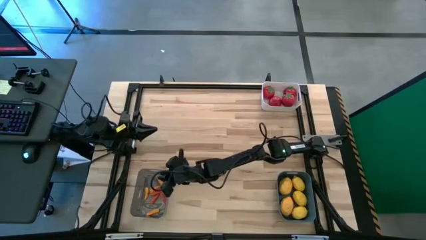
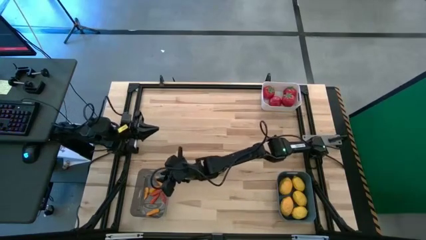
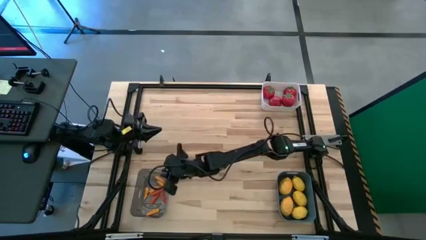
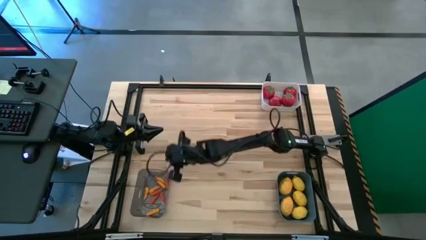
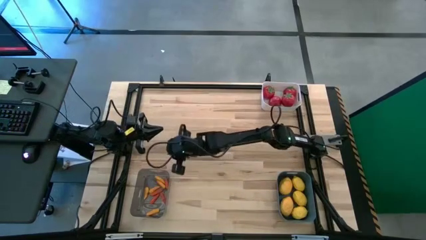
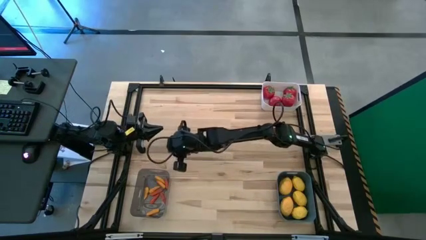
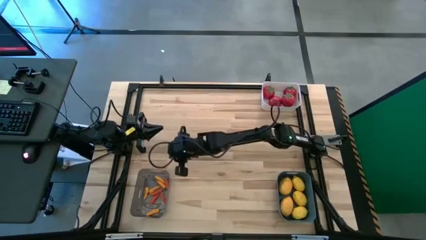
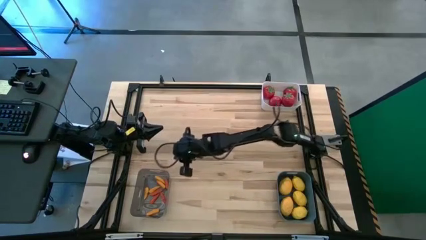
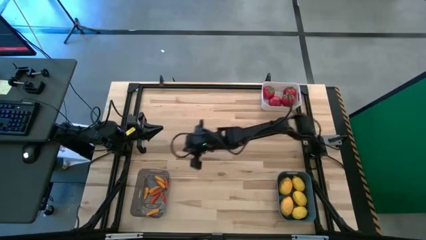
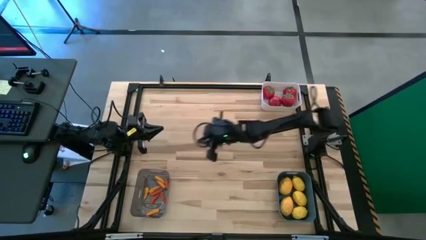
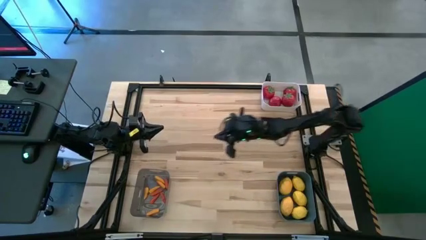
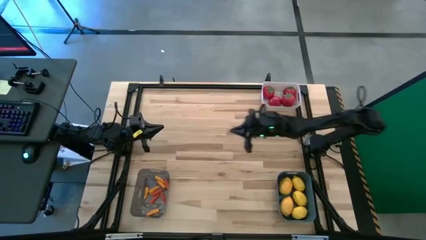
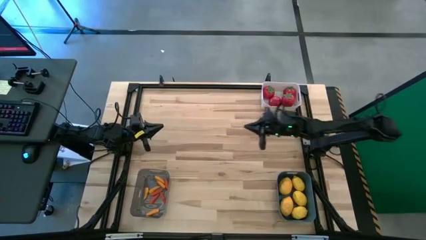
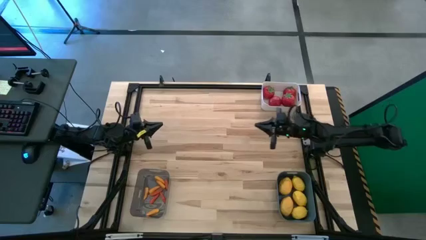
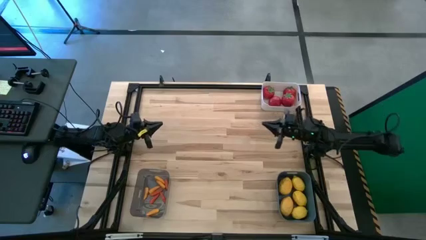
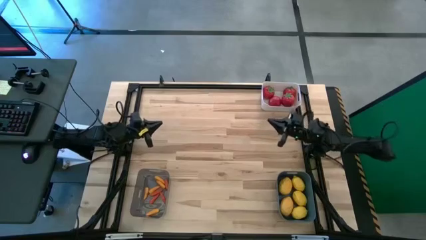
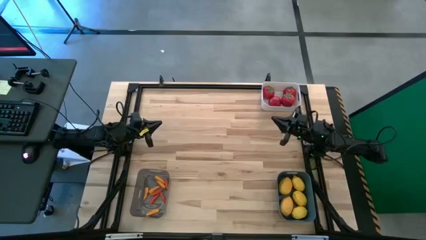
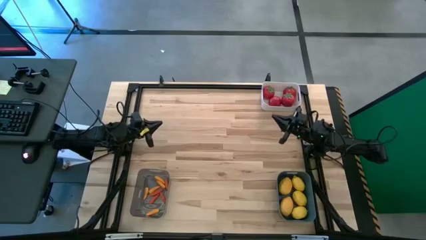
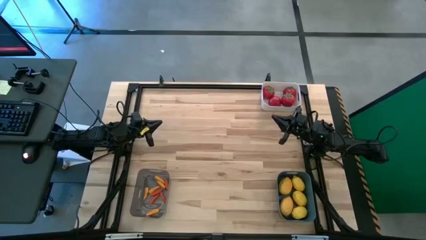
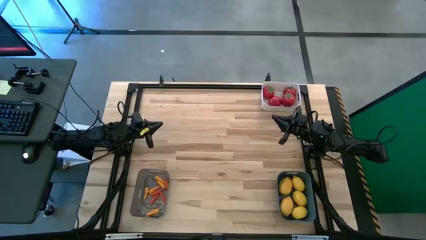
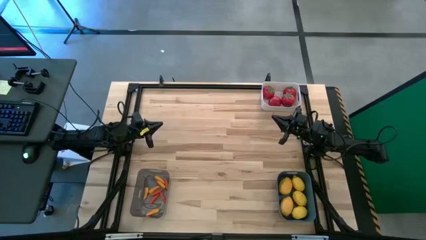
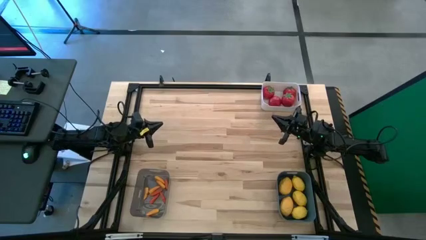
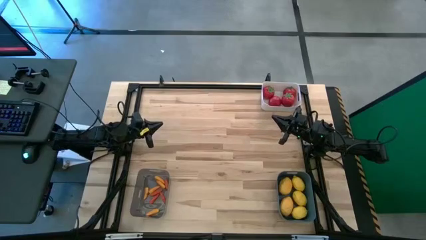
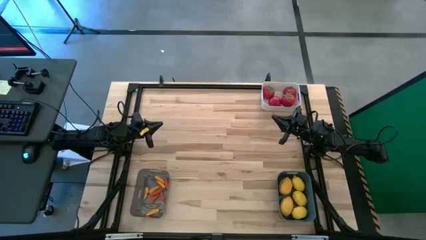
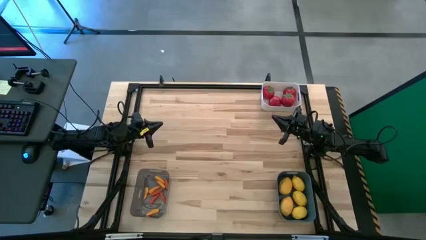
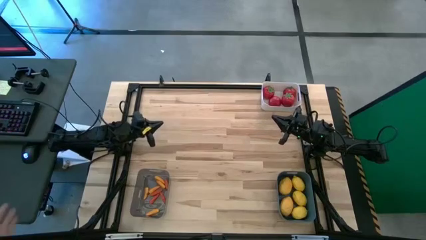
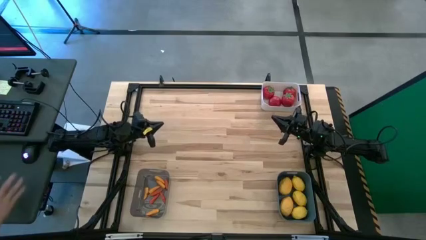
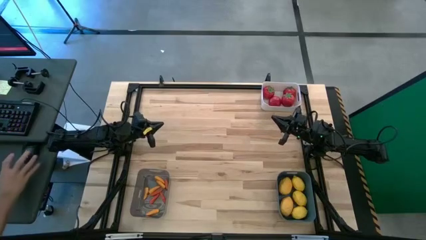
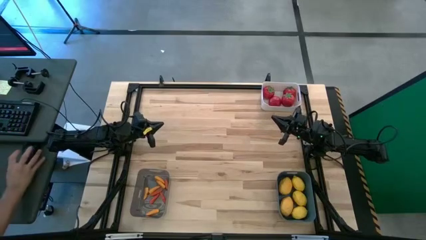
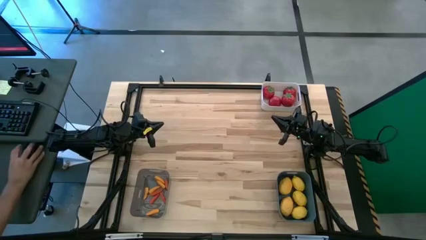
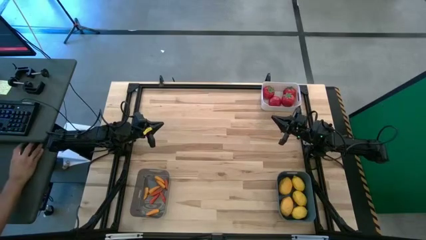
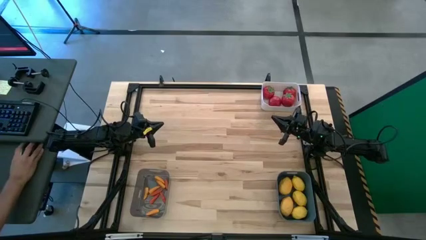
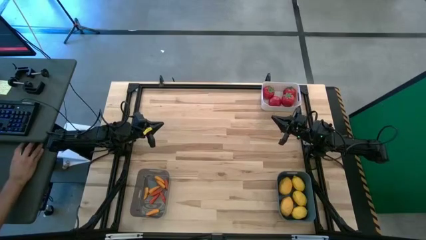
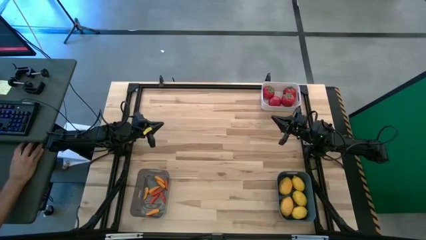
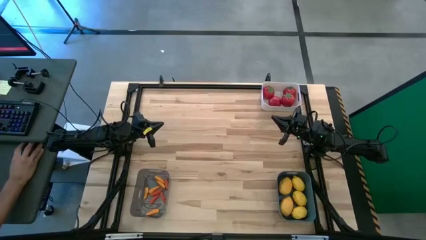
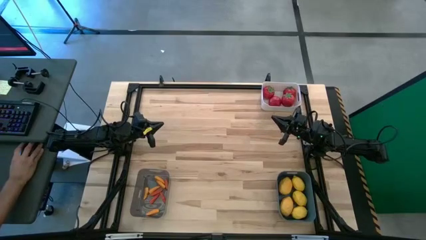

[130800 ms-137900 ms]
Task: Sort produce into baskets
Return to Home Position

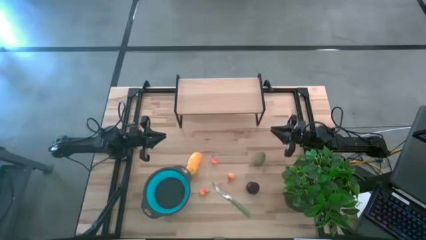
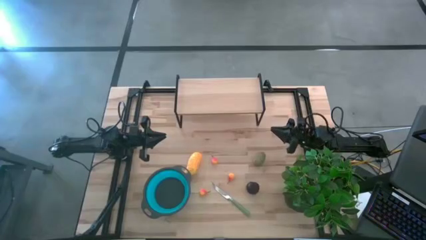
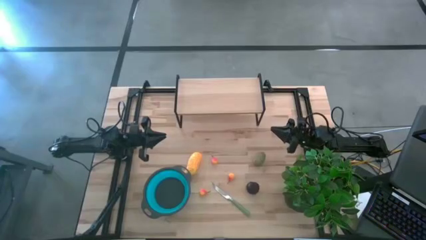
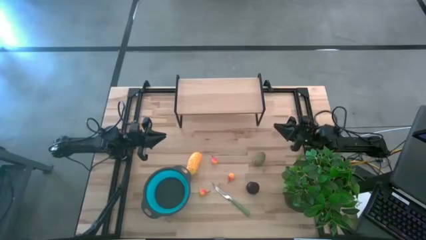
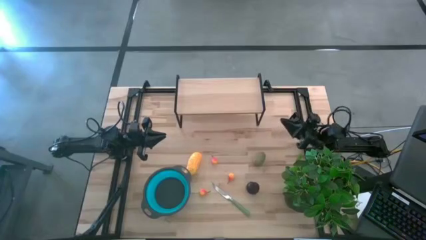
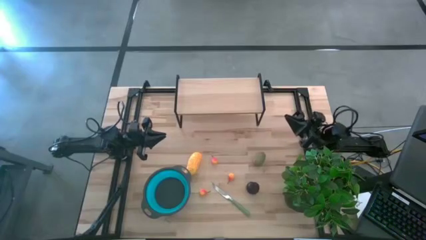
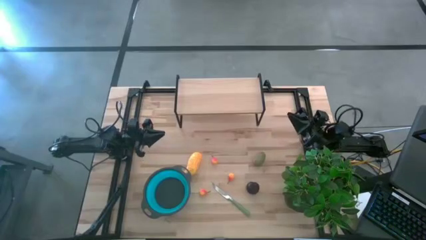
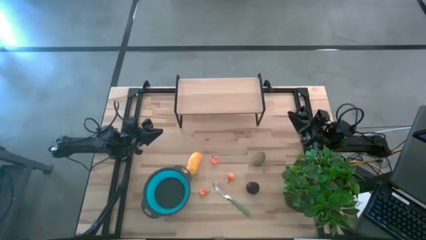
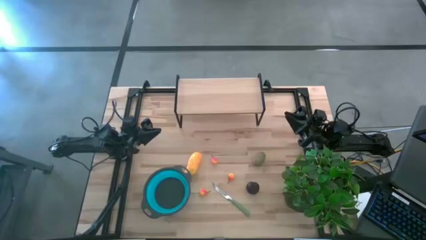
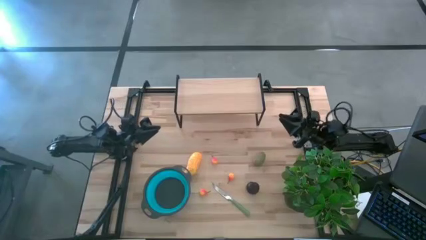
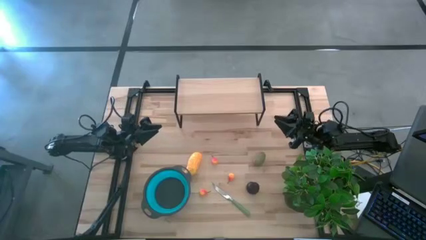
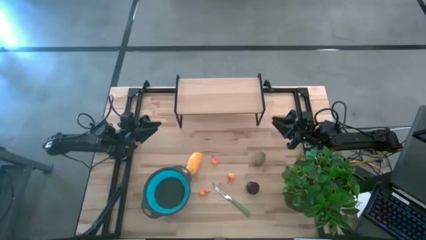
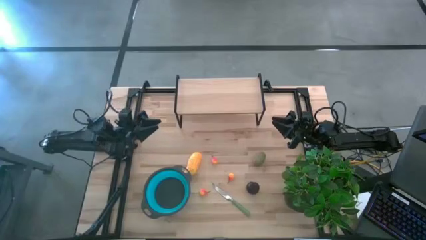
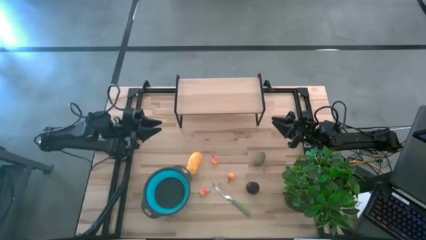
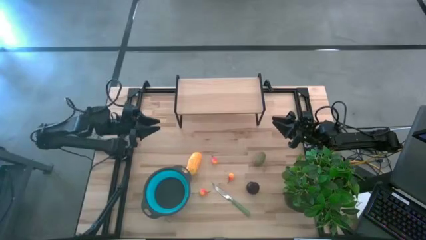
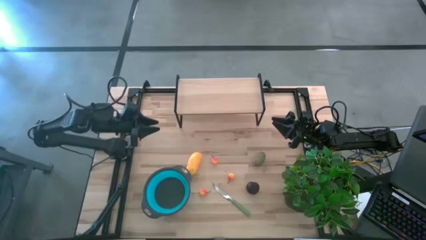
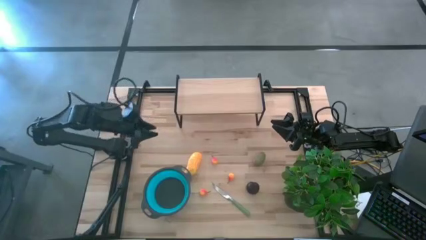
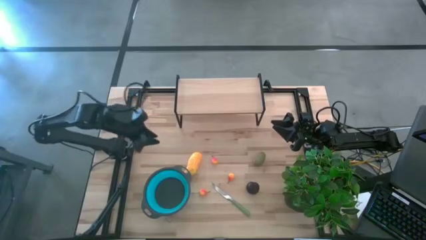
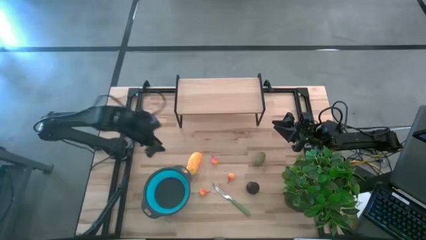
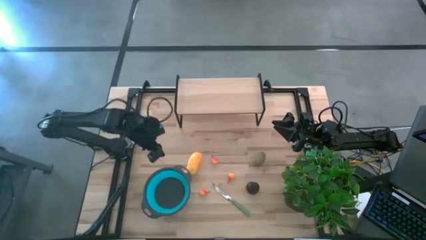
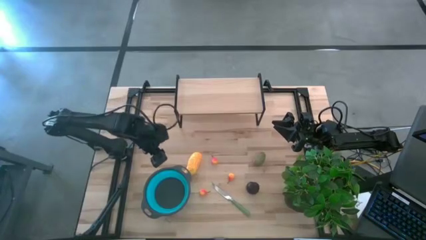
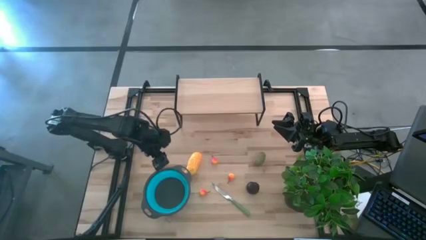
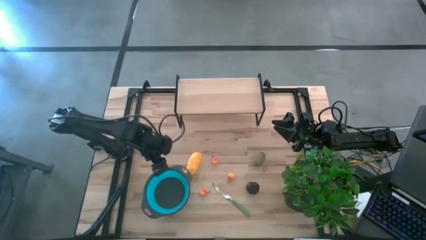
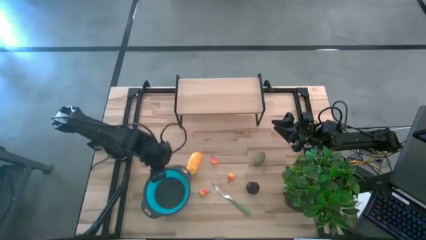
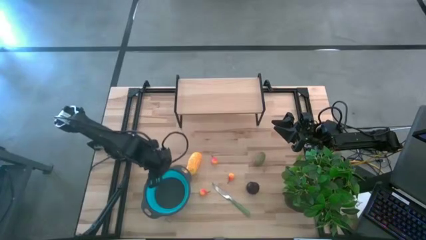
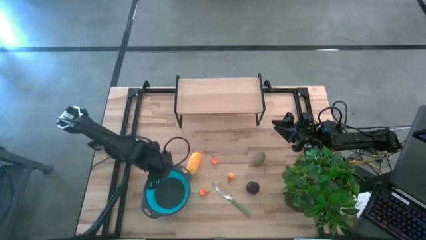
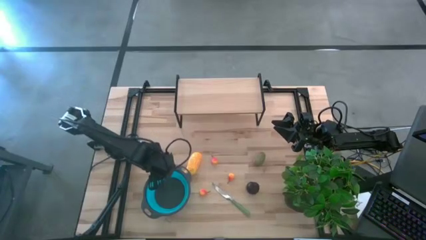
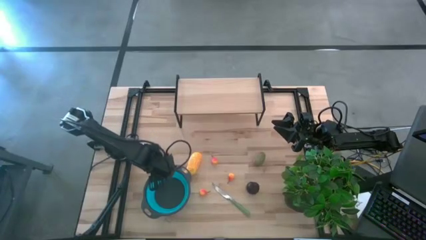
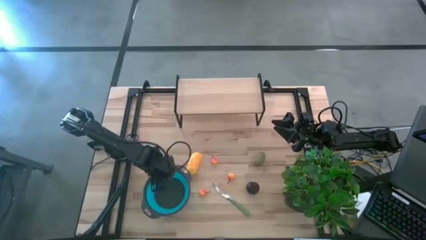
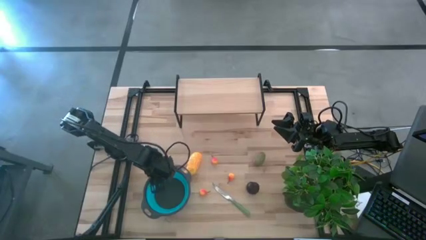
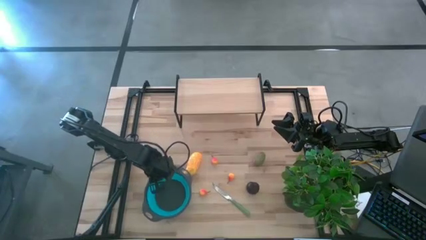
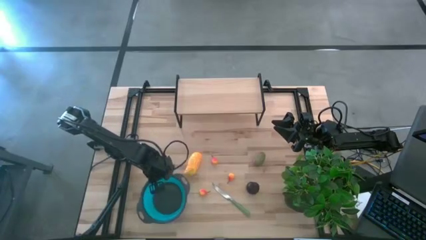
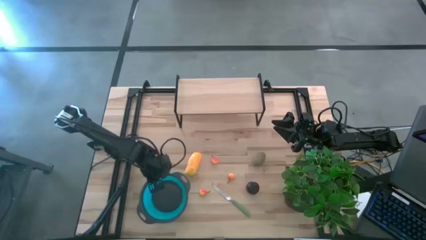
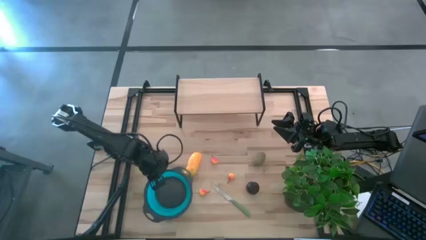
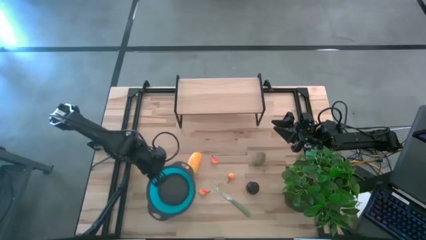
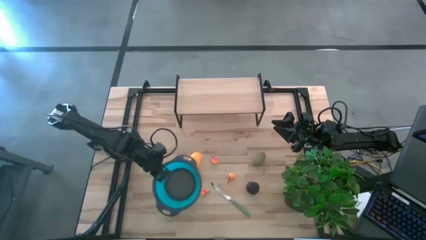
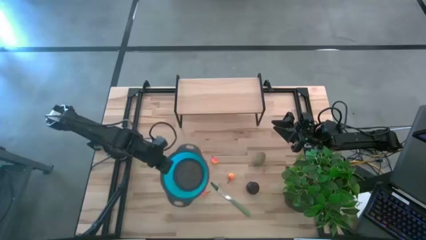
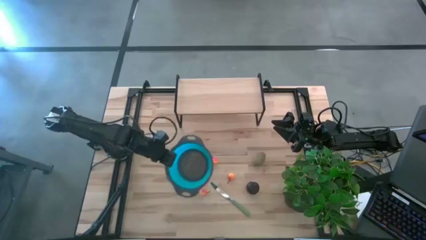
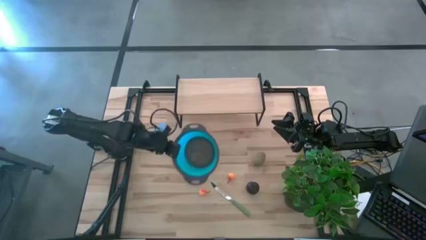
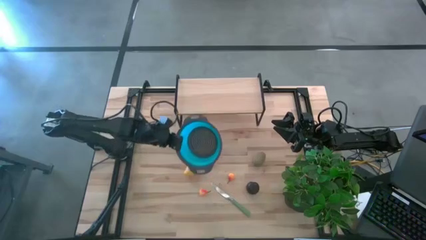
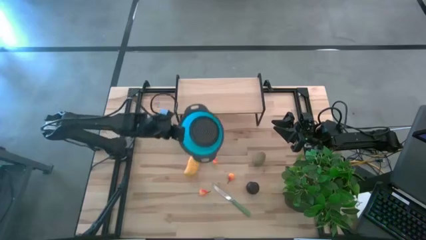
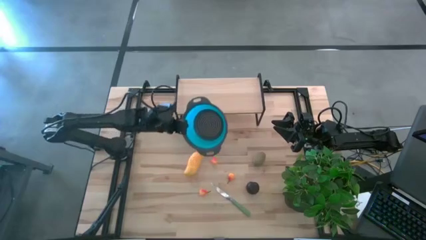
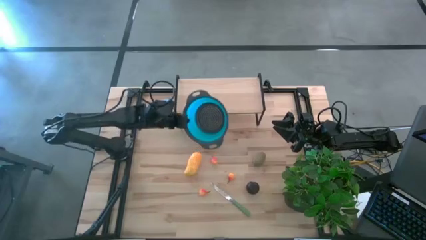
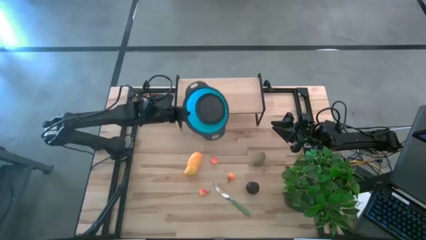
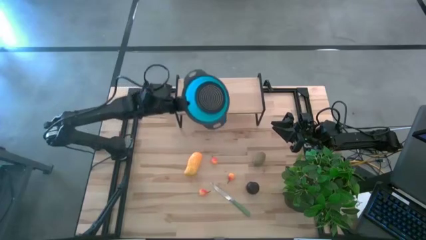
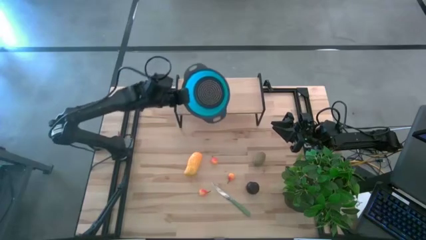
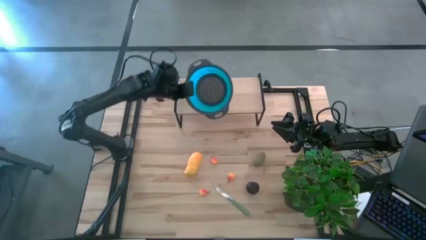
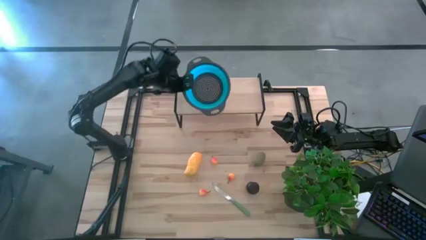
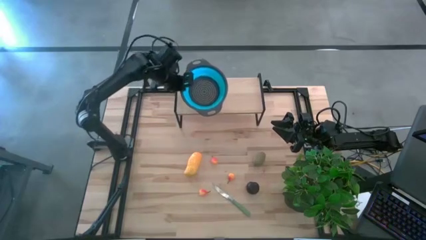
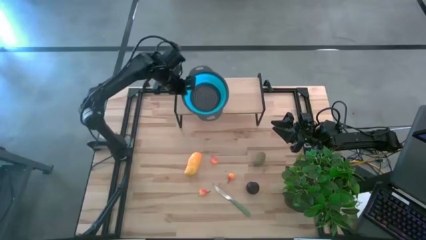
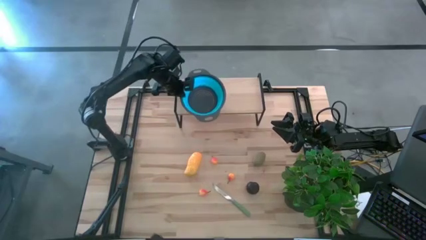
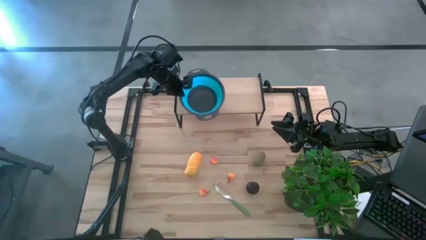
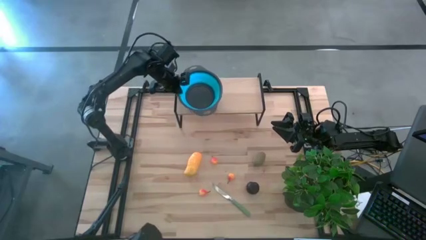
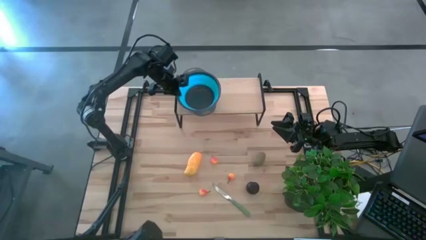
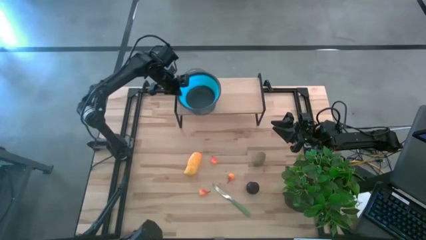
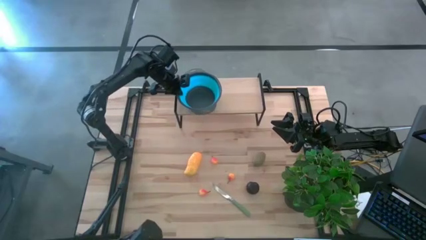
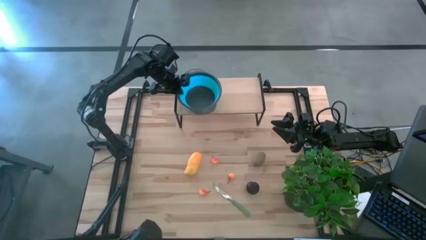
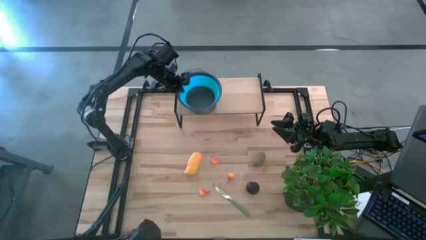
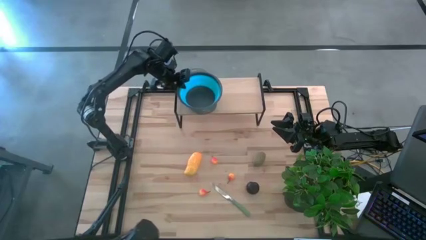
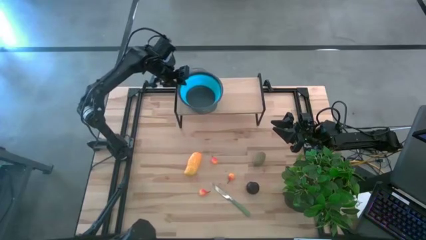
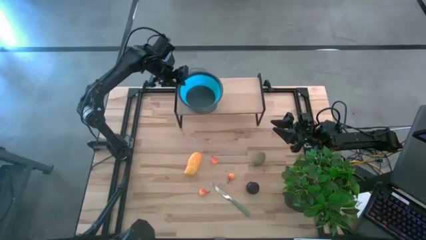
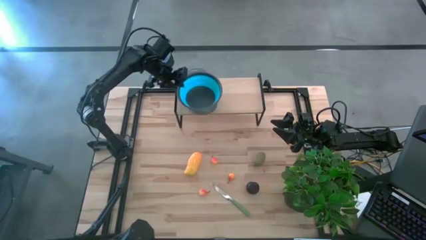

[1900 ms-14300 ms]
Task: Pick & Place Fruit
Put the blue strainer bowl on the shelf
